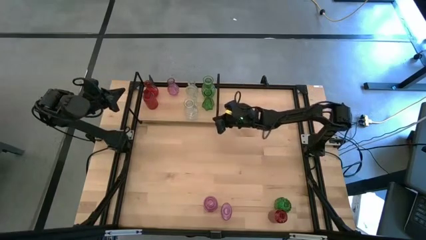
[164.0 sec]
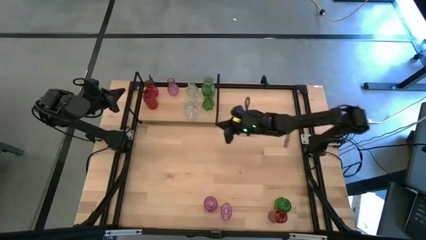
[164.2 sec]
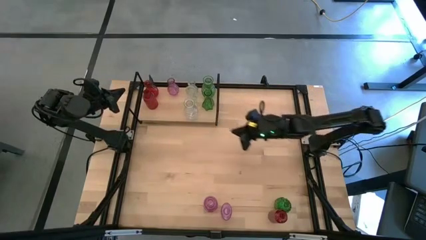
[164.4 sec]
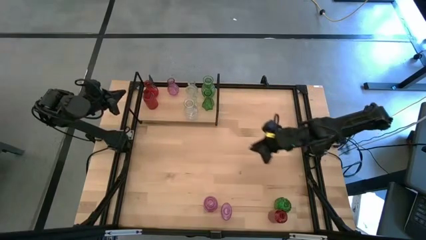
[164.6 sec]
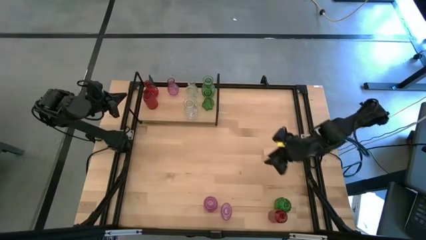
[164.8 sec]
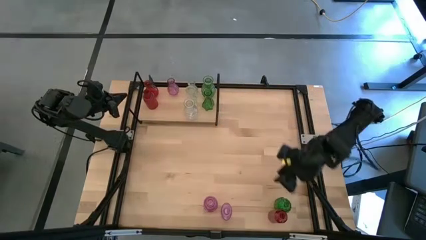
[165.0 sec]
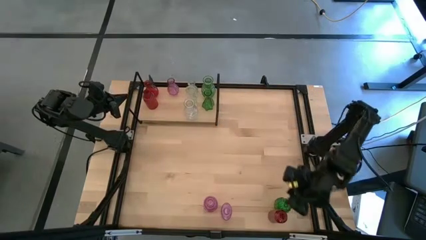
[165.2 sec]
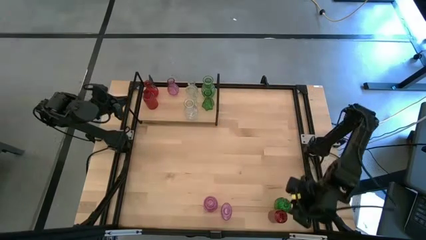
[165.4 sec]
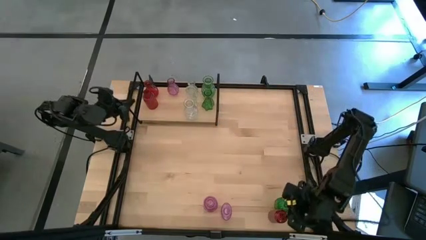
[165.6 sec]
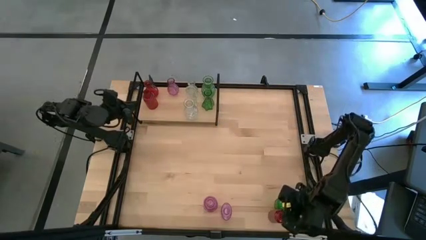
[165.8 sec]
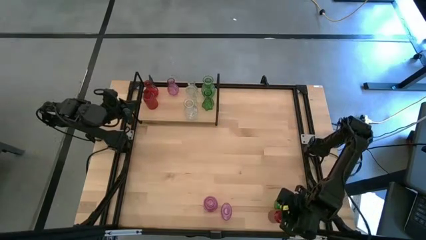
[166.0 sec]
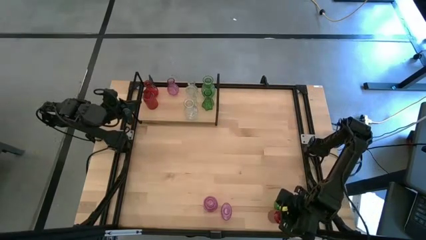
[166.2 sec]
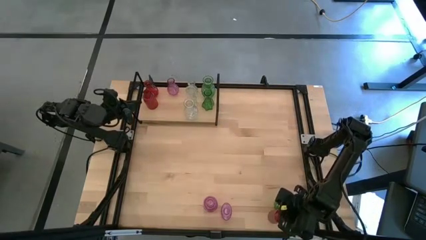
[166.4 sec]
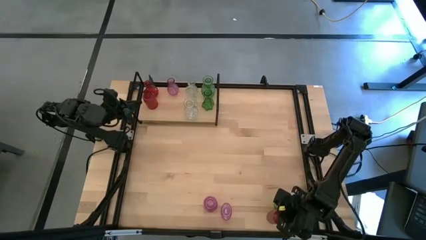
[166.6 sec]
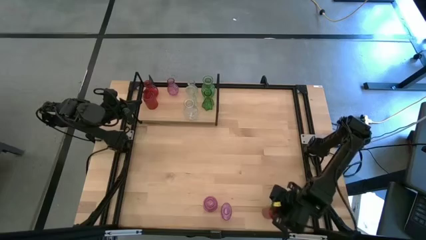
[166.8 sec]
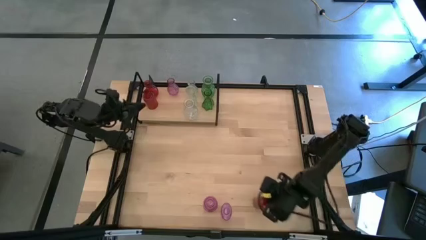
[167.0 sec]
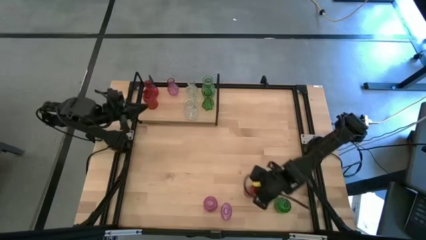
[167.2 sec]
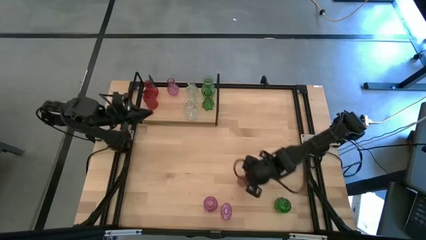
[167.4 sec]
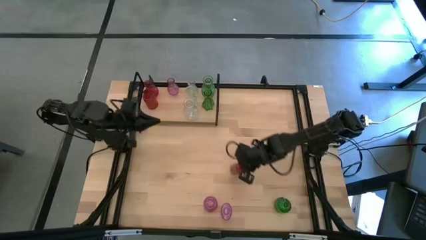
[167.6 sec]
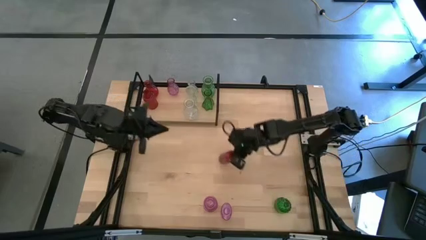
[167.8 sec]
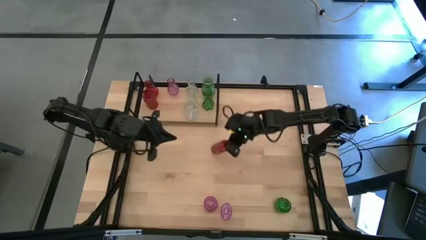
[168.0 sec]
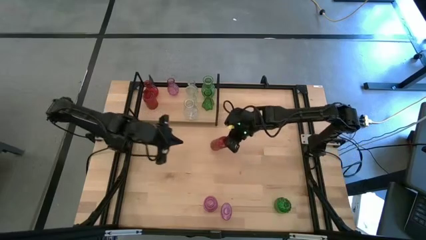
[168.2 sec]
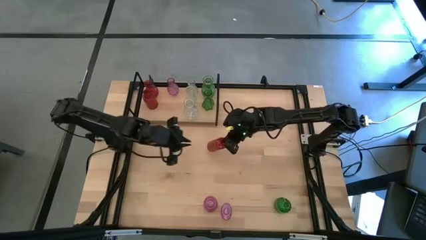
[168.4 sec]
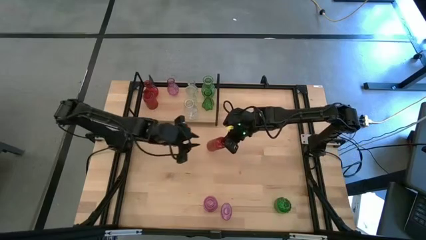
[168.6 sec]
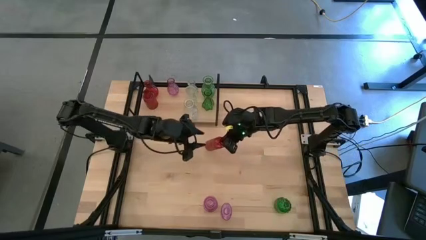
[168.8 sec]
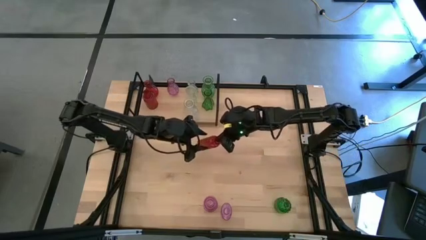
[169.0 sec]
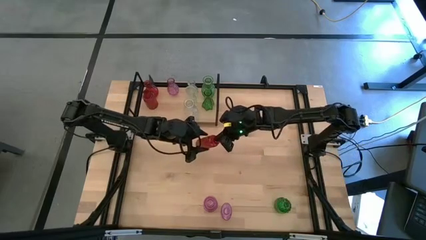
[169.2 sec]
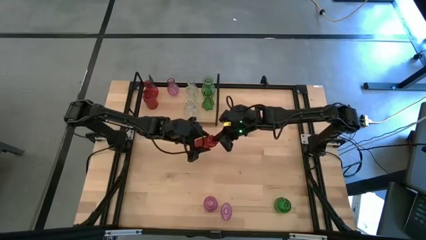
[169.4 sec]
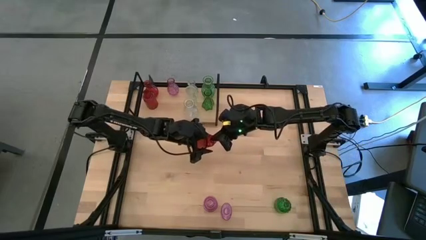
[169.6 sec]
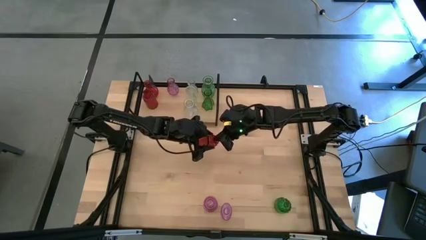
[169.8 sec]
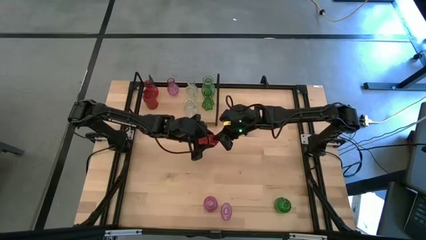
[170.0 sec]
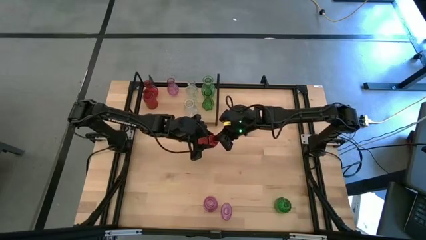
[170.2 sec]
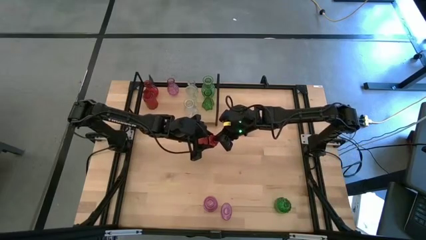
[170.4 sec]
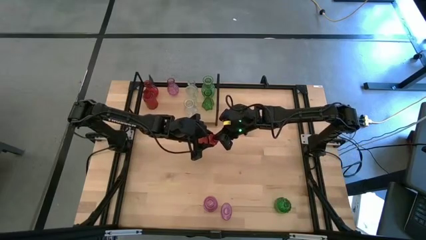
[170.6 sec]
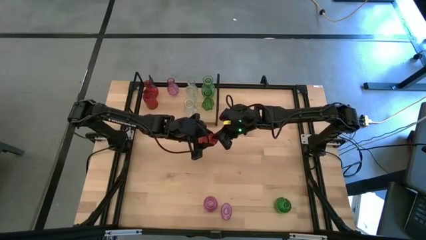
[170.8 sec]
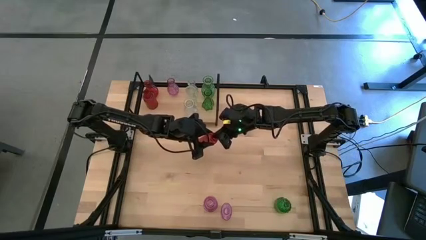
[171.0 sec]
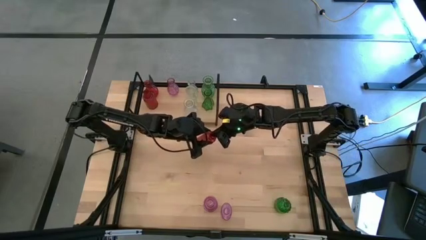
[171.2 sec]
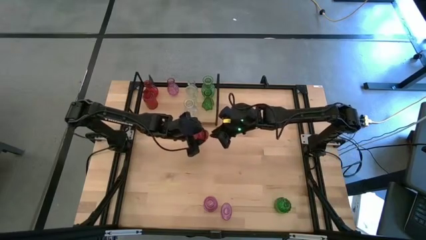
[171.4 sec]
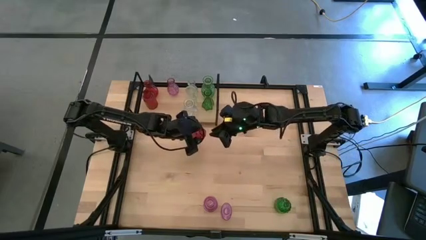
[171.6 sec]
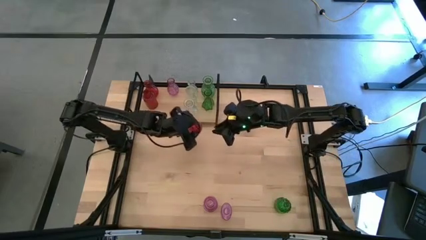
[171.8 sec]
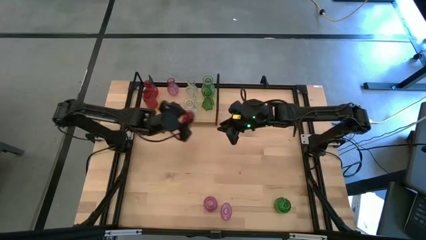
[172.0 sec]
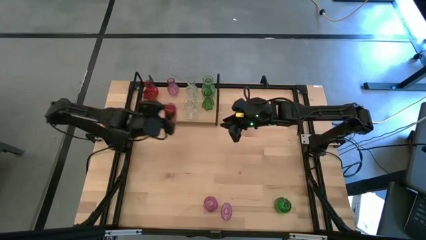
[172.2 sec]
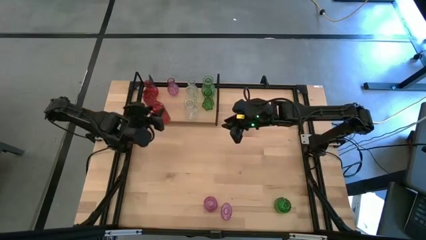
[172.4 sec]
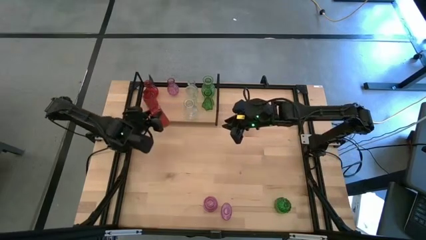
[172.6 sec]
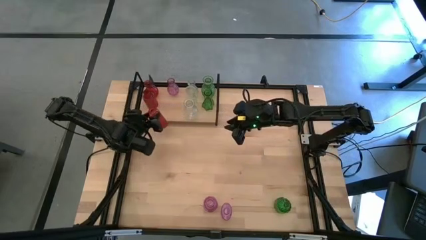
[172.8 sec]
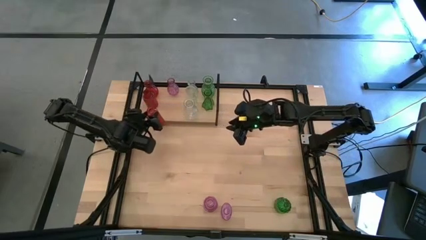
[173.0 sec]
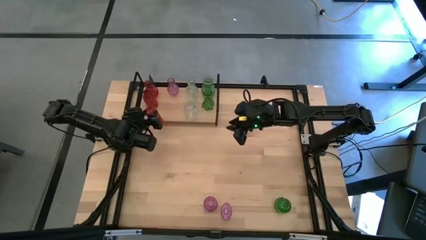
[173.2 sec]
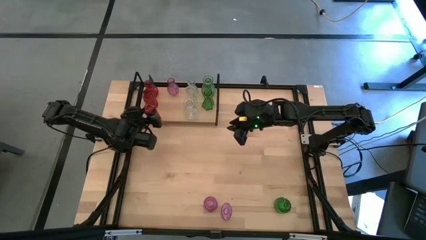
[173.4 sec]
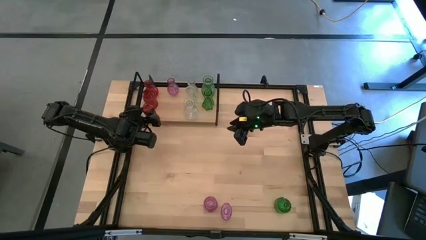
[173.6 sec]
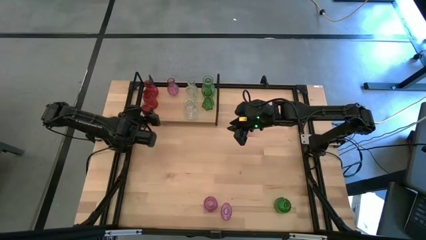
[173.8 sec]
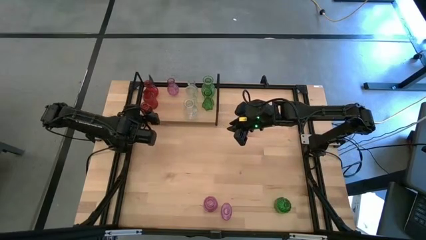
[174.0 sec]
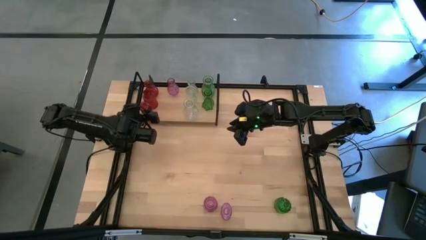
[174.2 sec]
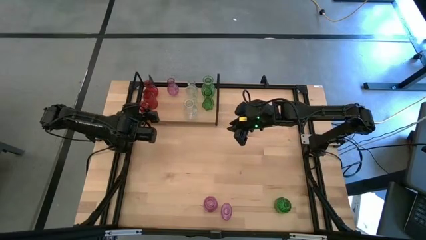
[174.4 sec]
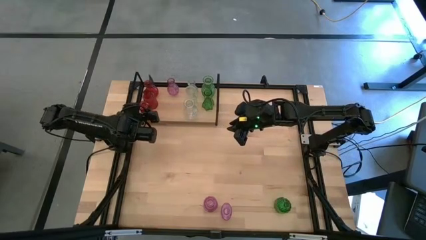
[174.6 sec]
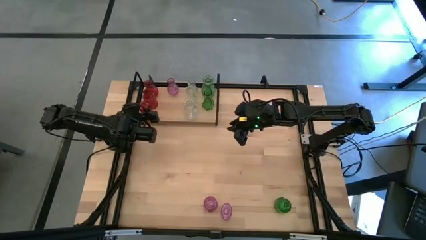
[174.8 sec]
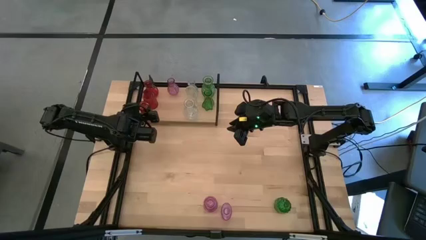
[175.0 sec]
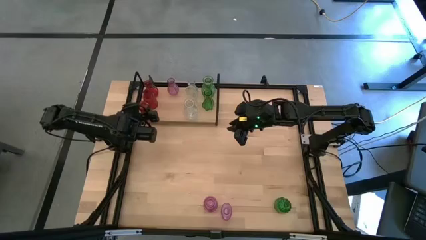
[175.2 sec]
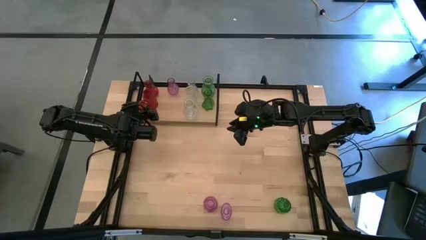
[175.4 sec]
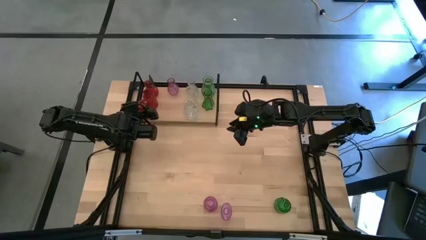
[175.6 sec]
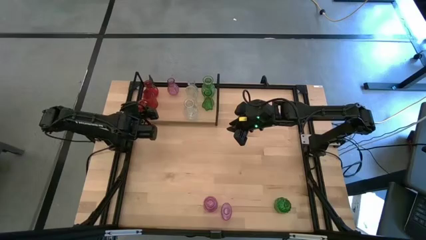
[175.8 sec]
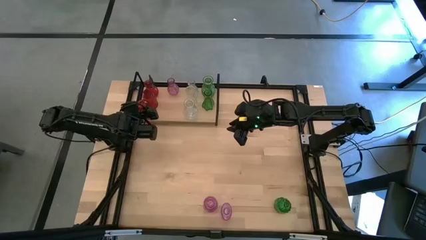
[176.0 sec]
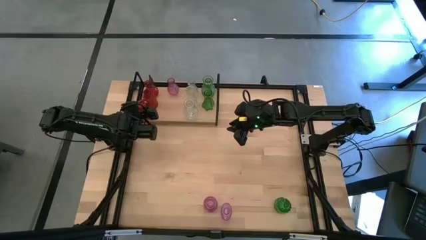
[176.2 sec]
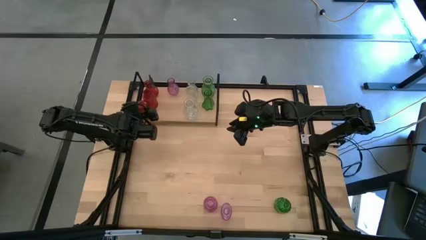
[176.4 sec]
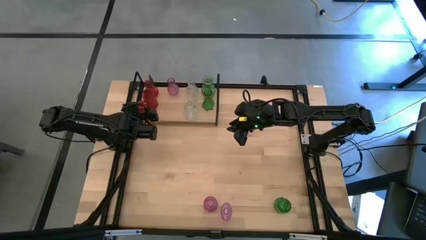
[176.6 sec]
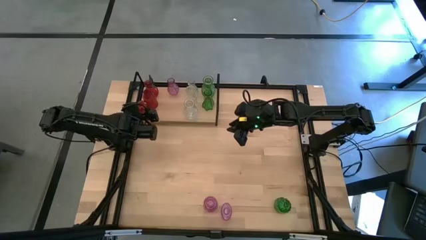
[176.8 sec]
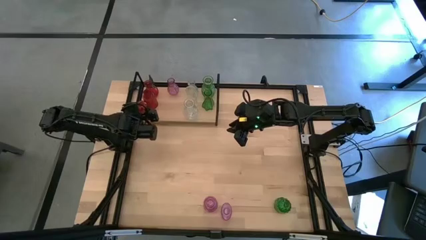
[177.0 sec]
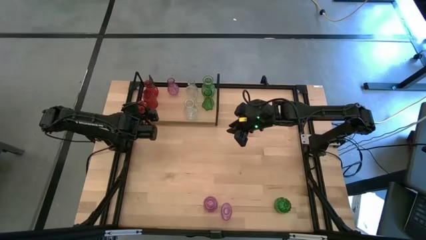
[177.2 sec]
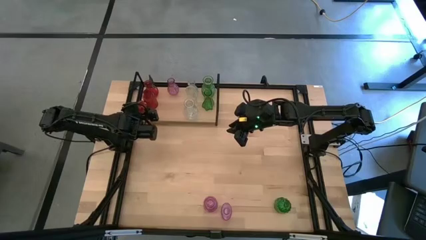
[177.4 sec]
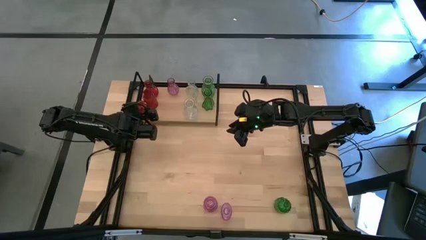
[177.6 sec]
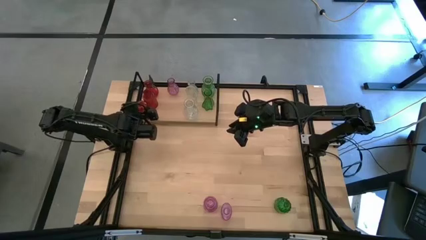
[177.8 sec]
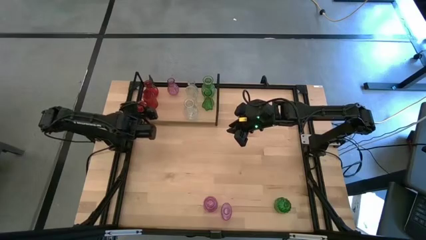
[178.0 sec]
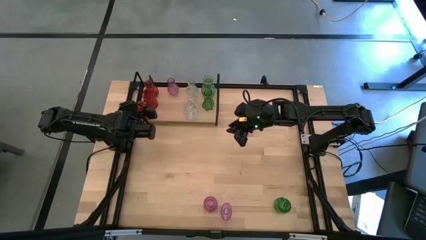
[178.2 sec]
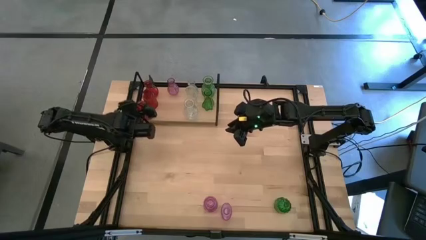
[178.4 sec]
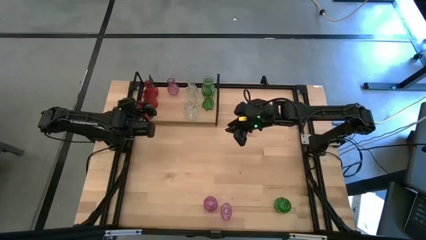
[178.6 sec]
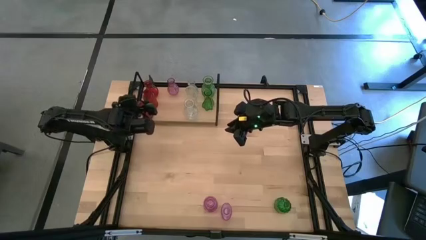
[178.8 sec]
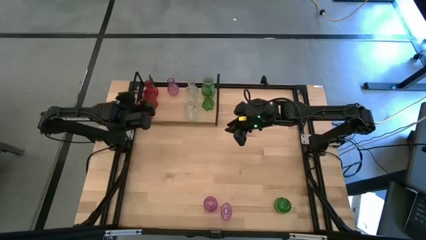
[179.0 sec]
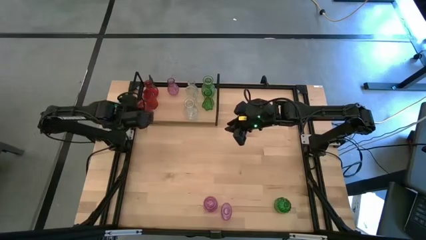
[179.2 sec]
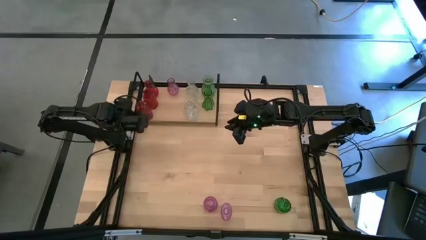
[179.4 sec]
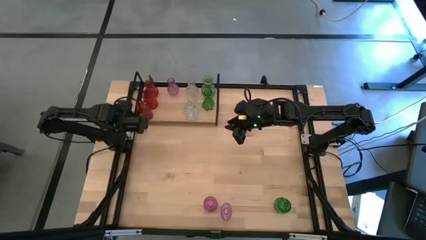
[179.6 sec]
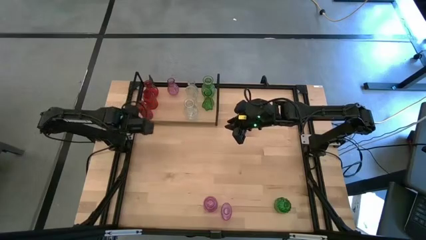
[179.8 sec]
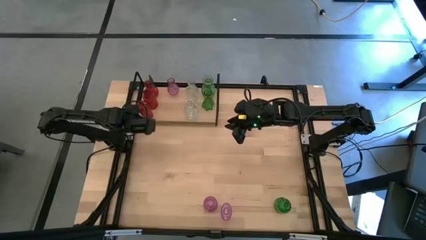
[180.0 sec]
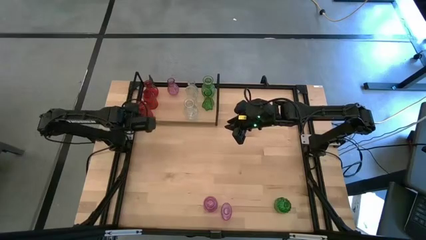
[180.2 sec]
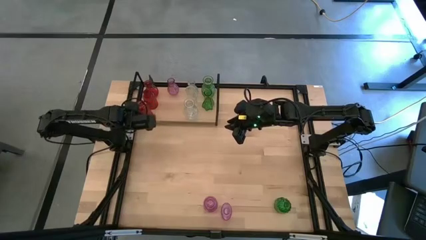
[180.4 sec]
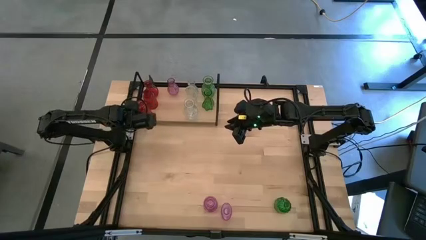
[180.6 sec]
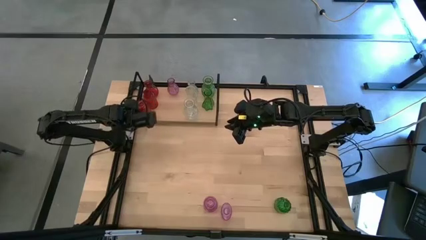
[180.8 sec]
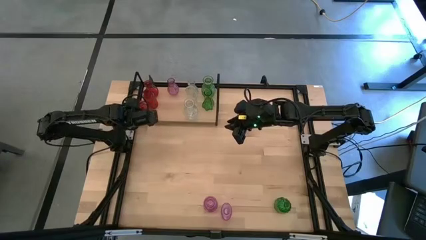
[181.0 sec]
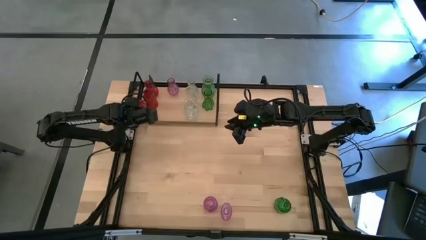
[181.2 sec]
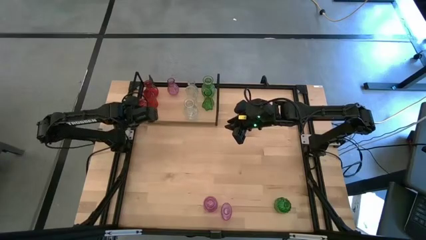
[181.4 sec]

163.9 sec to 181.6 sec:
Task: sort vases onto shelf
Put the red vase on the shelf aligned with the other red vases
